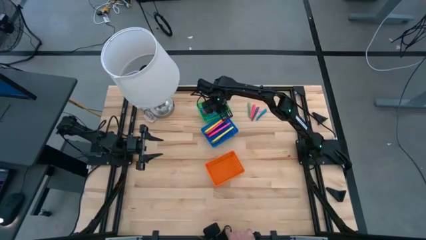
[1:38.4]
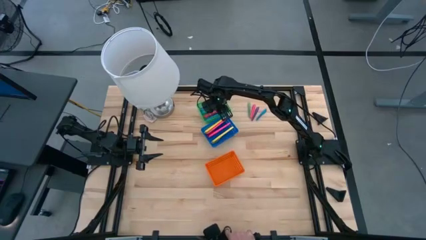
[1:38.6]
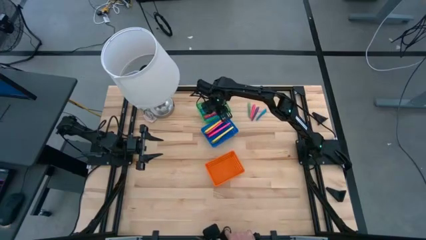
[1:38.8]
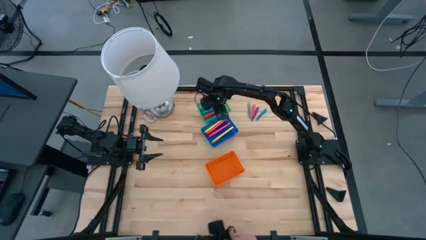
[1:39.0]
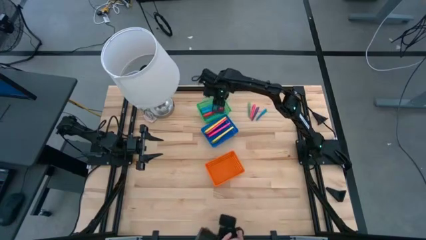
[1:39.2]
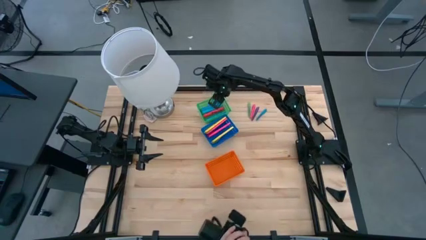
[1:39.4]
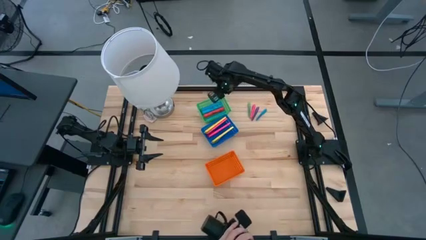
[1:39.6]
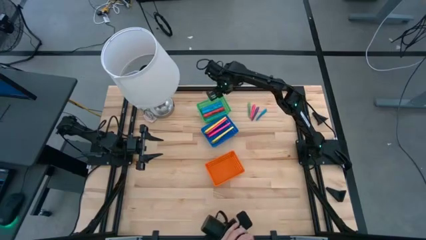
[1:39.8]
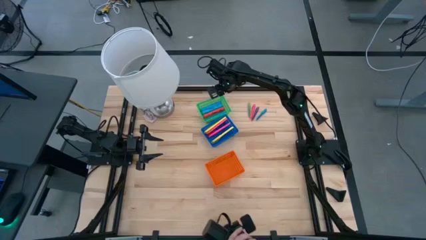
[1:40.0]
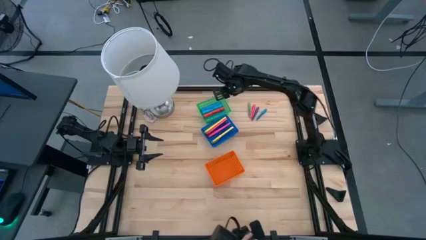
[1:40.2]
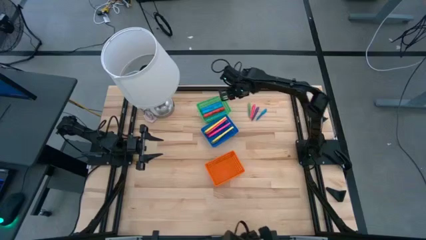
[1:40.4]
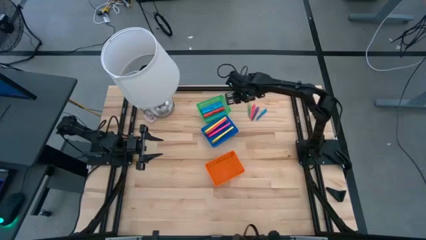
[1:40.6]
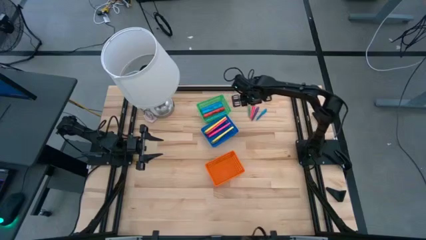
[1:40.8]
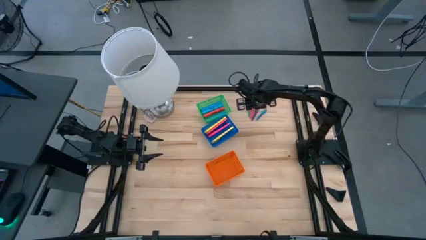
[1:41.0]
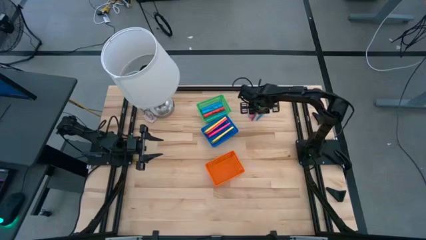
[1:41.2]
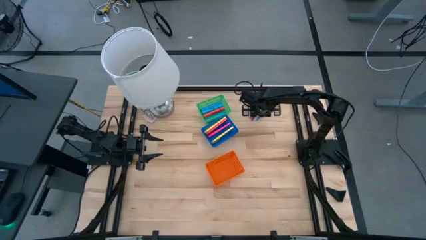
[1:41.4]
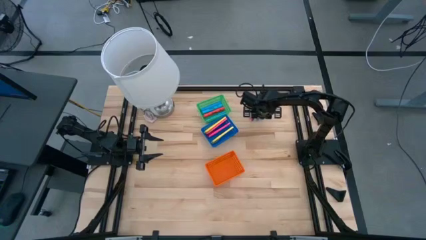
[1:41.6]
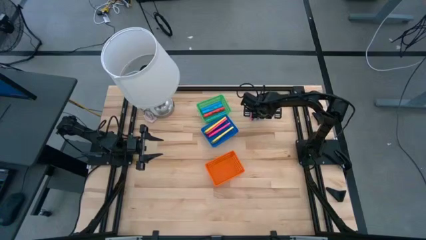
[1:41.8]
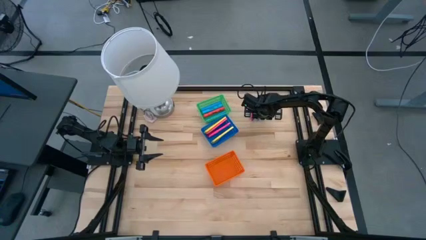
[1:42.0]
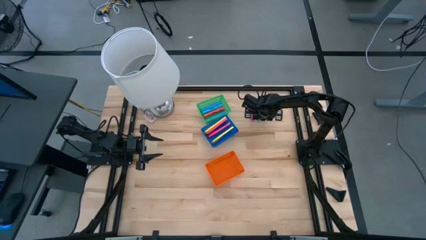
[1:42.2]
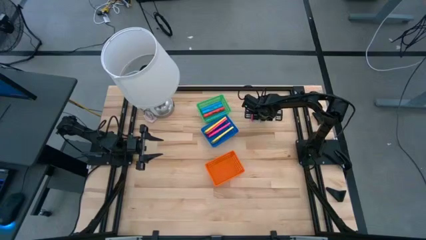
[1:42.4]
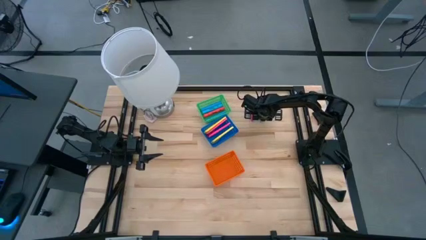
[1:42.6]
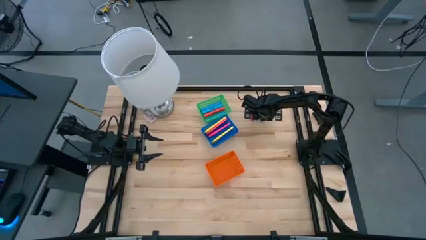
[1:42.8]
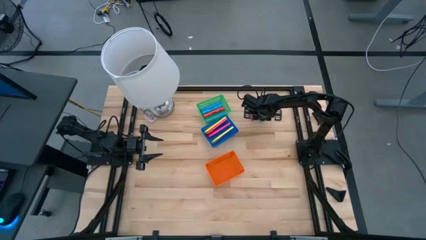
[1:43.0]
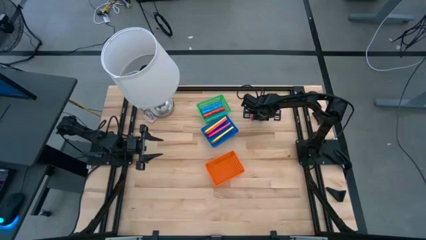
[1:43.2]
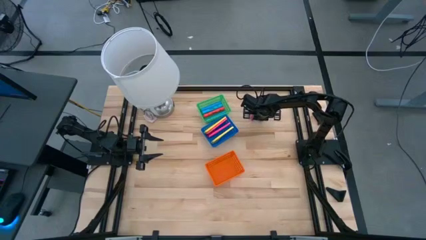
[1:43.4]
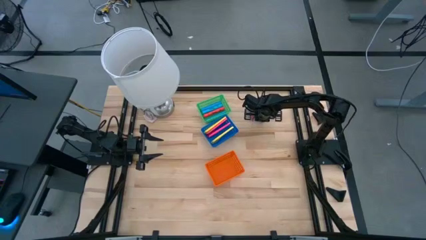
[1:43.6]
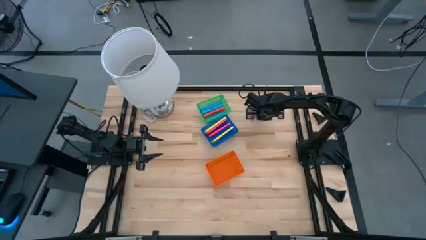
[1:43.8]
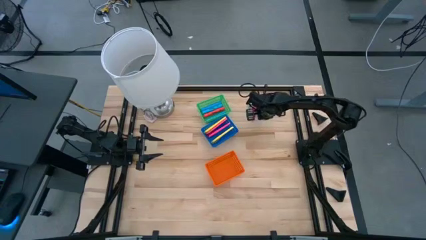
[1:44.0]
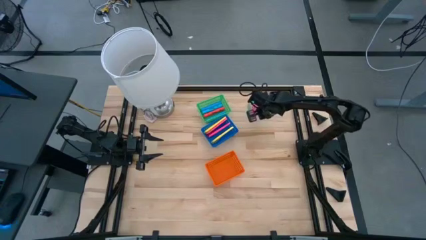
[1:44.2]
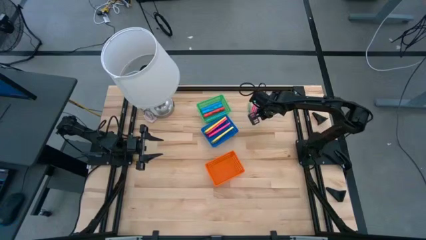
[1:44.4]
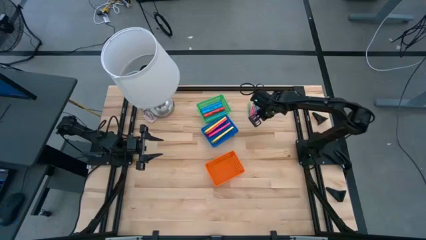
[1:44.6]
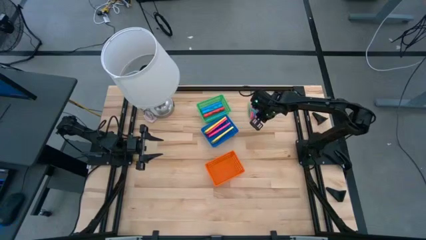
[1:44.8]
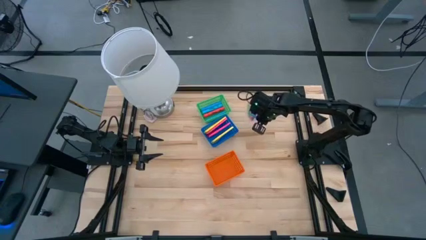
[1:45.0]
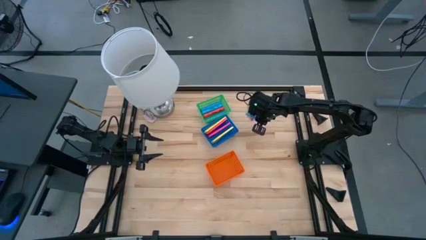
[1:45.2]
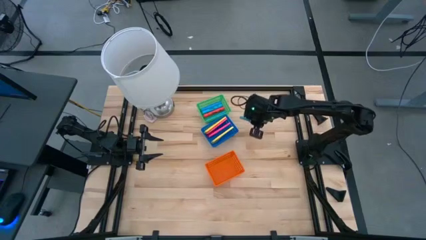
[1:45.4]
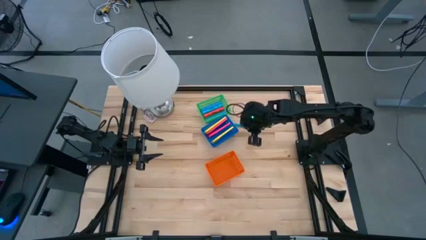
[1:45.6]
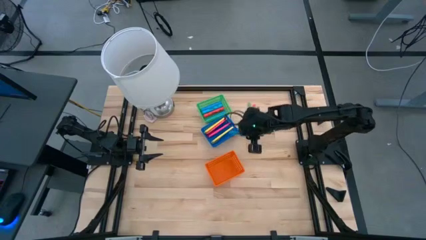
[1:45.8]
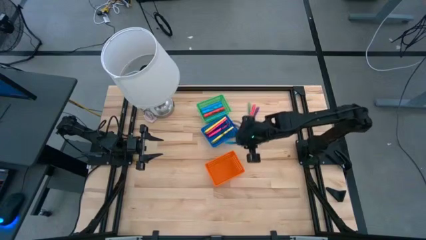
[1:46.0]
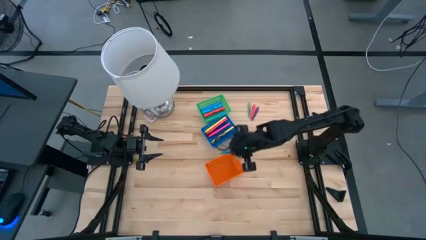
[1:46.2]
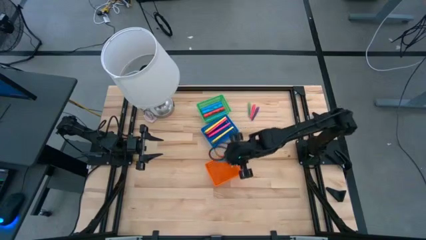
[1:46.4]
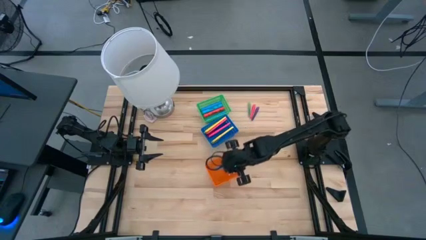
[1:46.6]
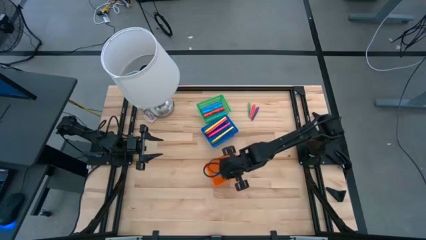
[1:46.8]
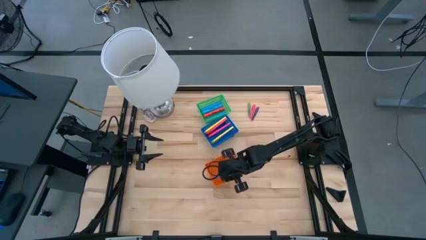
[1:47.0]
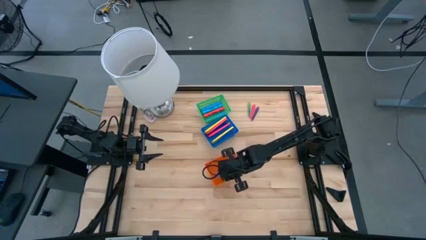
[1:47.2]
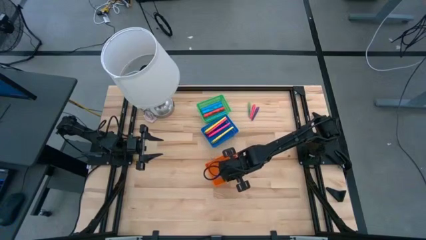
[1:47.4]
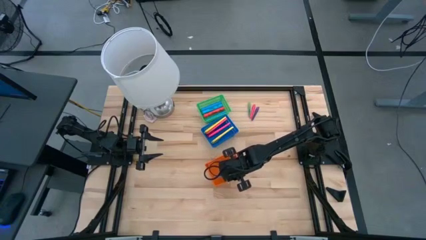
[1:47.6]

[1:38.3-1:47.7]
Task: Pick & Place Markers
Put the blue marker pen into the orange bin

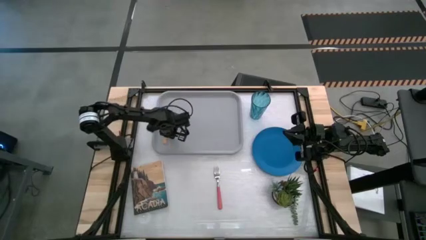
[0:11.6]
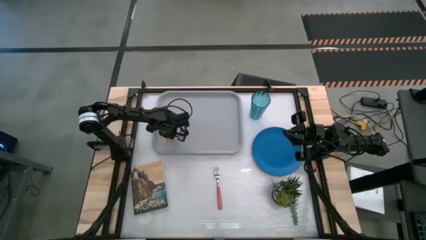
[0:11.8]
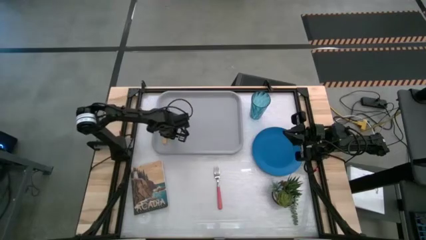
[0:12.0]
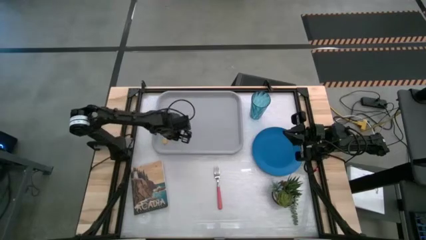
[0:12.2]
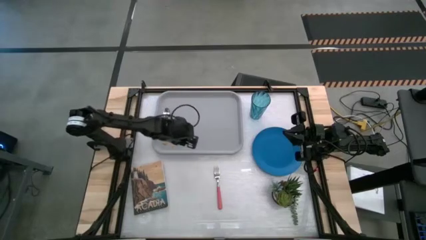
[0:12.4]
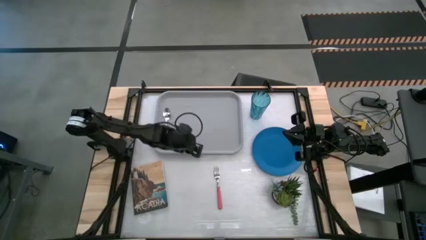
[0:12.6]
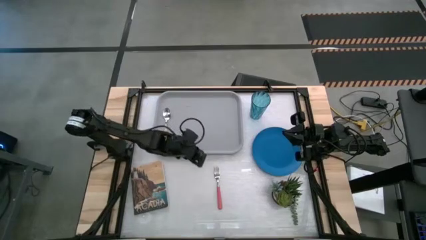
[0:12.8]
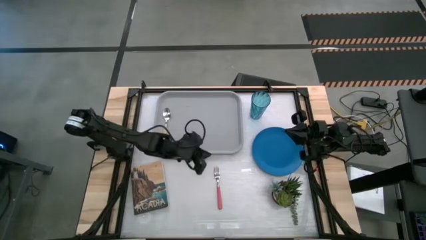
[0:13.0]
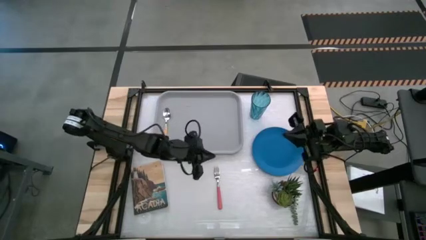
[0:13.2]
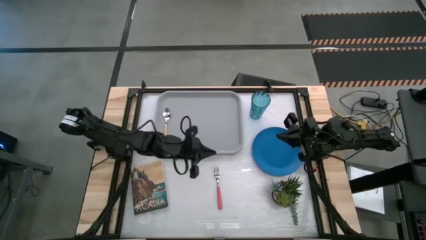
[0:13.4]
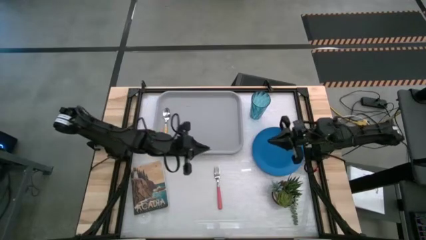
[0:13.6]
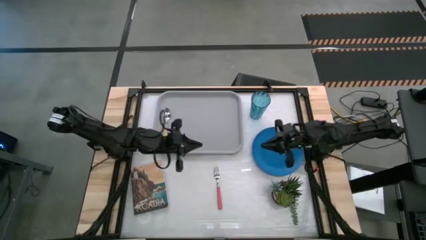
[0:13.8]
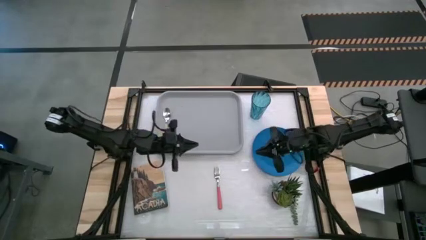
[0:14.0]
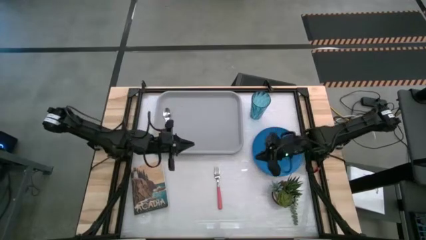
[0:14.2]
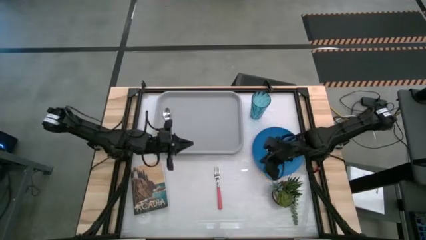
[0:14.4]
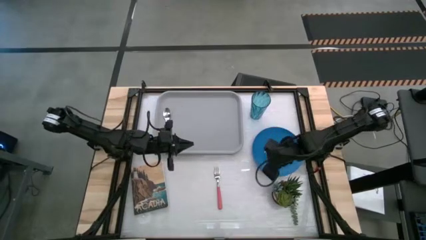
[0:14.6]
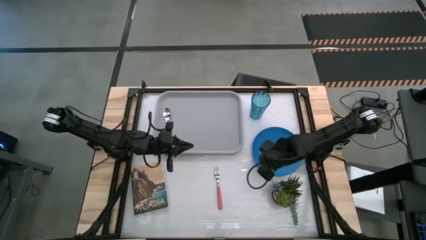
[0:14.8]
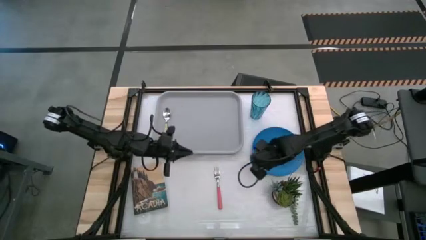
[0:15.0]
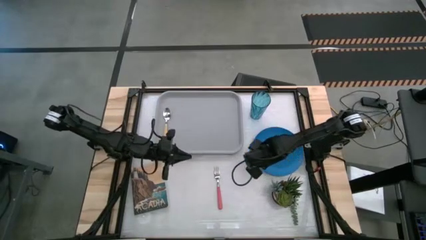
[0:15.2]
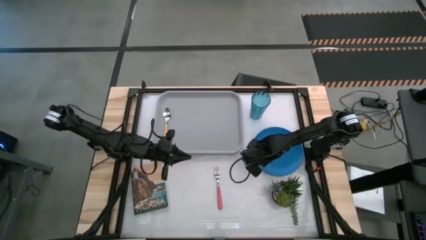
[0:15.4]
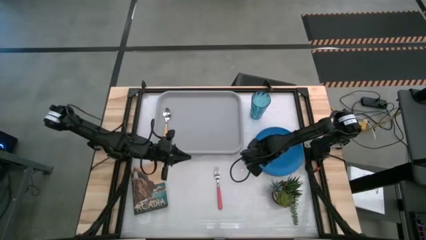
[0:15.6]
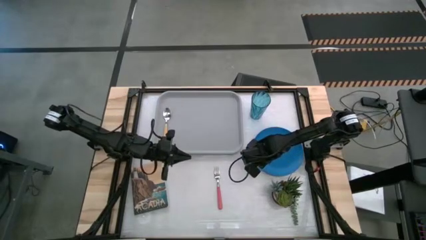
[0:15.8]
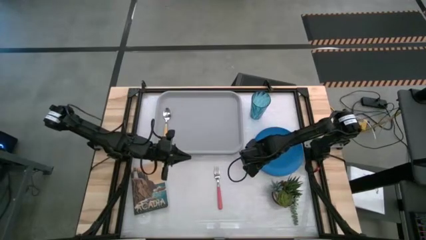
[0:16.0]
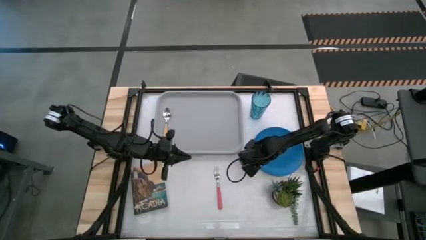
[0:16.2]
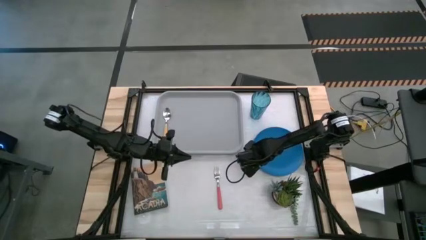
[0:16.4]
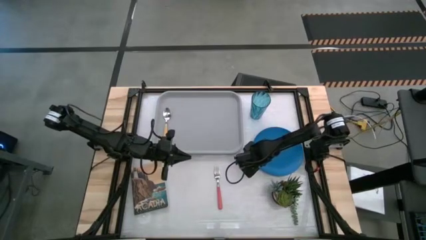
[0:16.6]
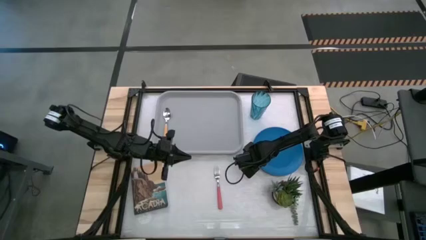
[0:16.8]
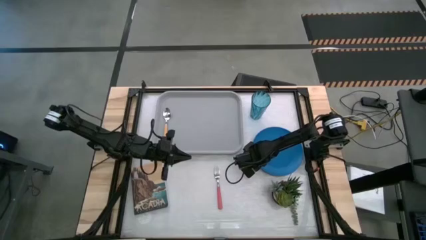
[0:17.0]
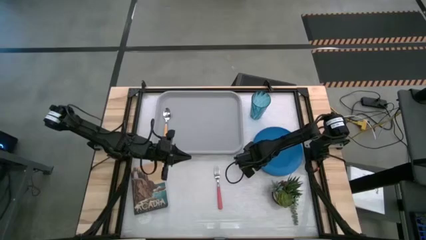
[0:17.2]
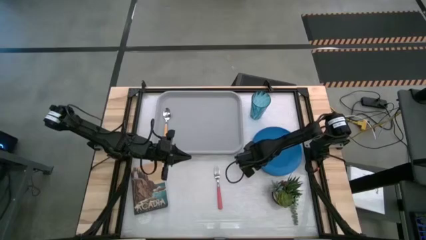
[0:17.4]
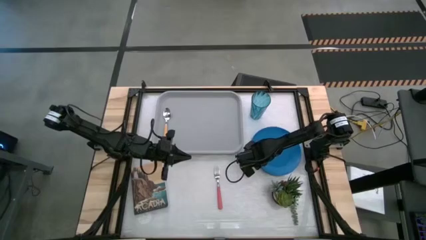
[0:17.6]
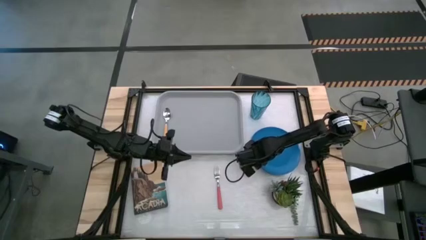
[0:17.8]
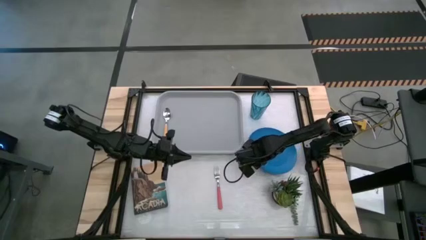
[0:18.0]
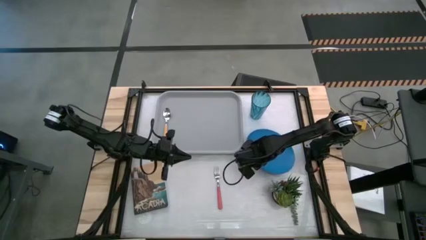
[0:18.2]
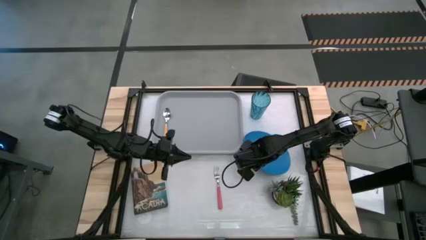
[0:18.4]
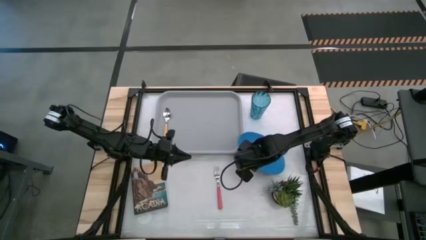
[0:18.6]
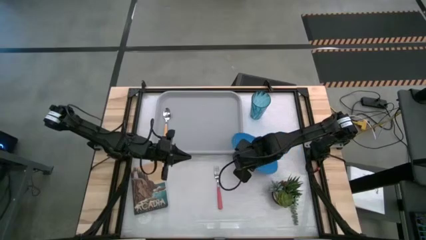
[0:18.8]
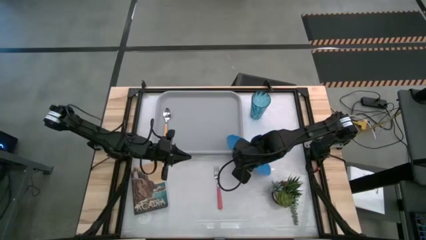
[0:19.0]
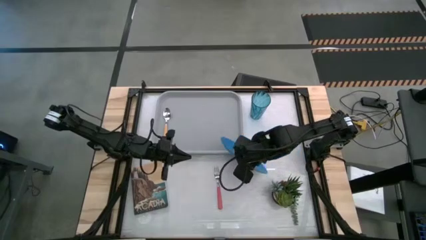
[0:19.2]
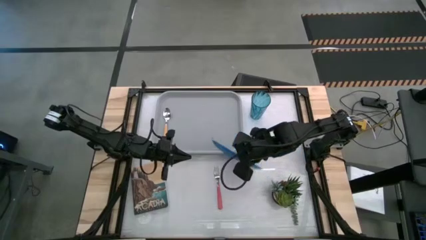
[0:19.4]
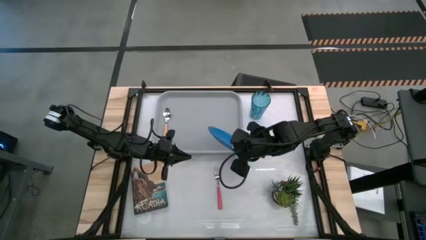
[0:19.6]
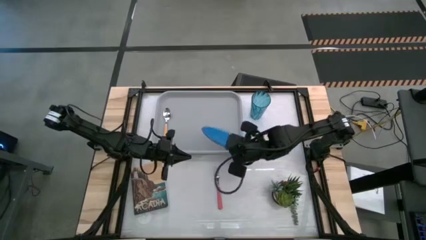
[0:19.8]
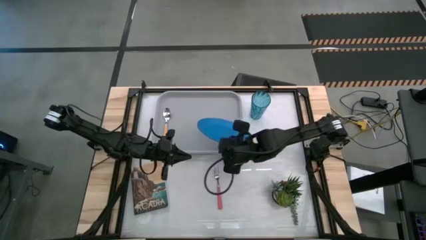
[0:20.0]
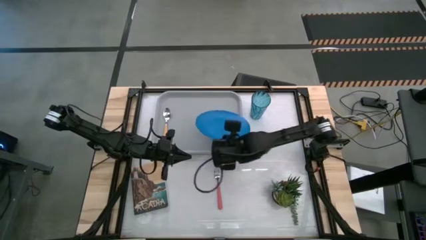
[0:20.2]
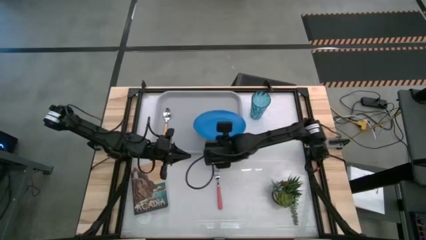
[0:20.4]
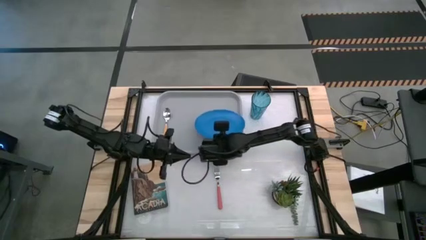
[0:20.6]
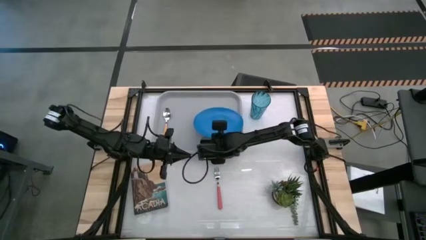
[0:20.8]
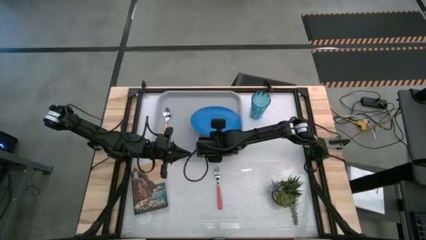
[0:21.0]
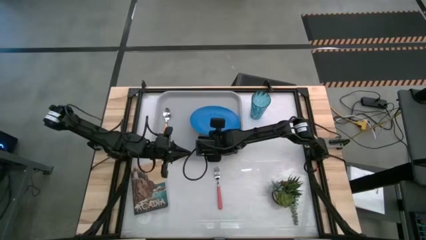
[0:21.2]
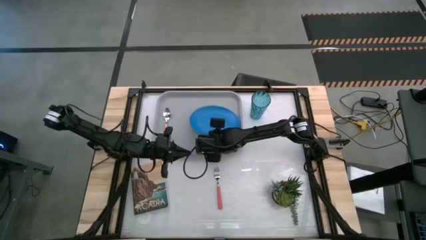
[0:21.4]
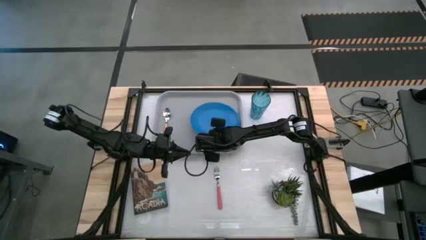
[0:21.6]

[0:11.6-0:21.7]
Task: Pick and place plate/cup/fork/spoon on tray
Put the blue plate on the right of the gray serving tray
